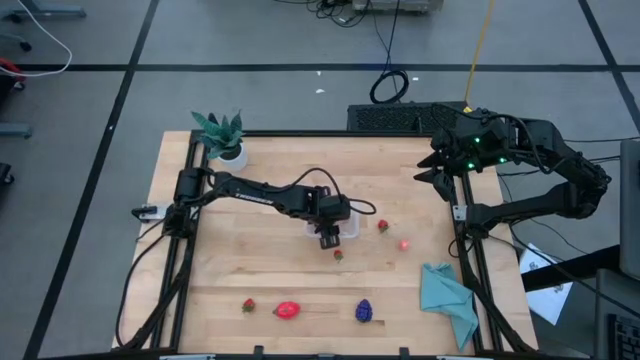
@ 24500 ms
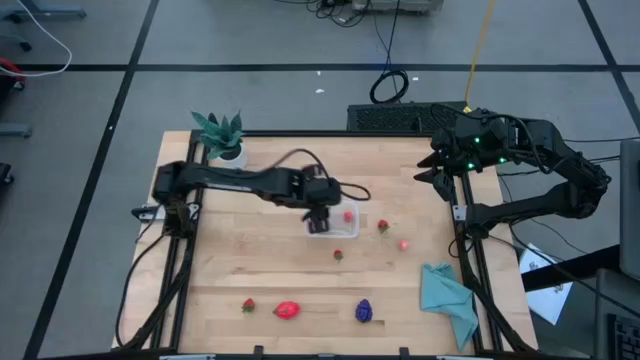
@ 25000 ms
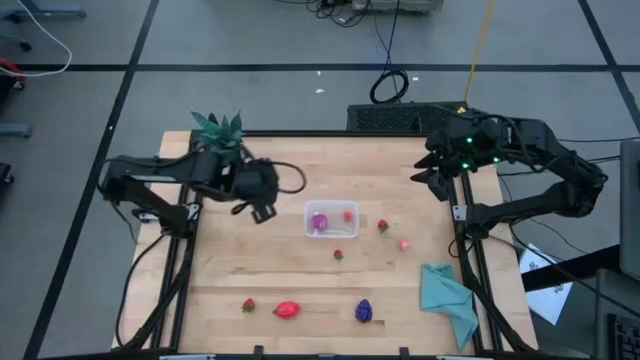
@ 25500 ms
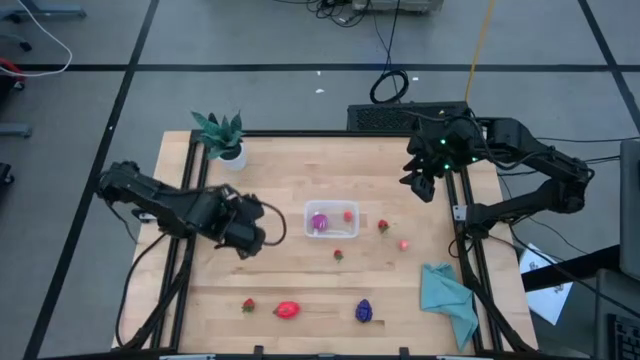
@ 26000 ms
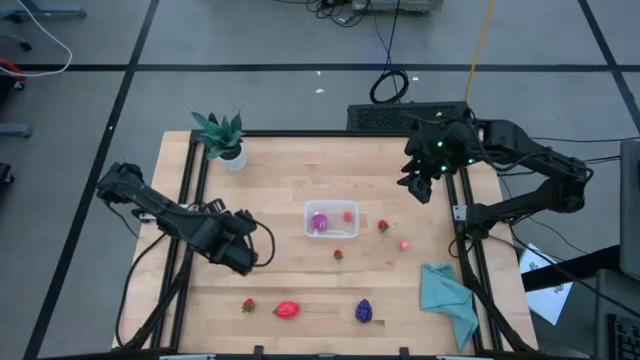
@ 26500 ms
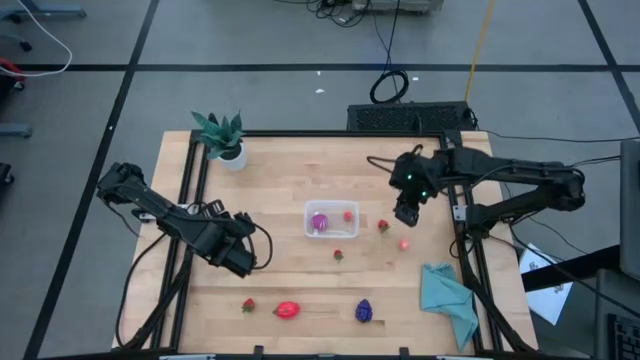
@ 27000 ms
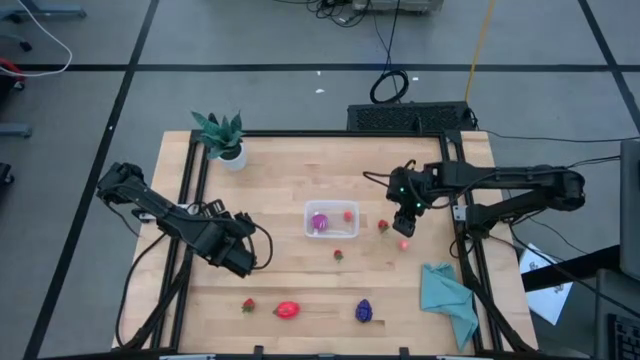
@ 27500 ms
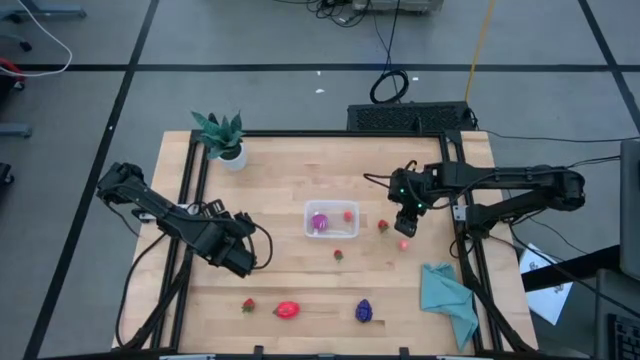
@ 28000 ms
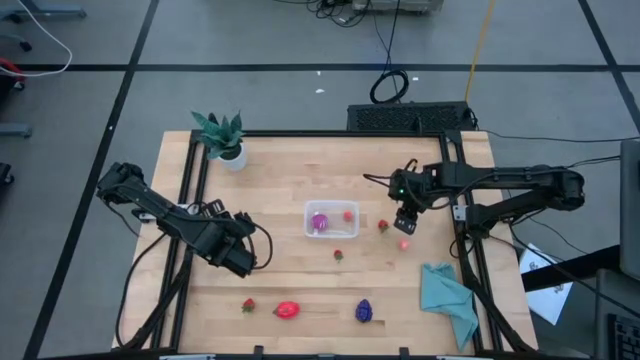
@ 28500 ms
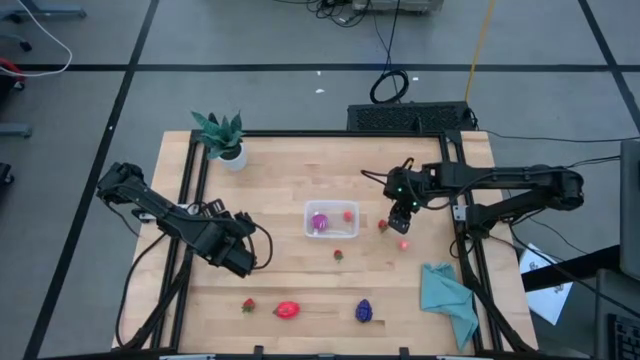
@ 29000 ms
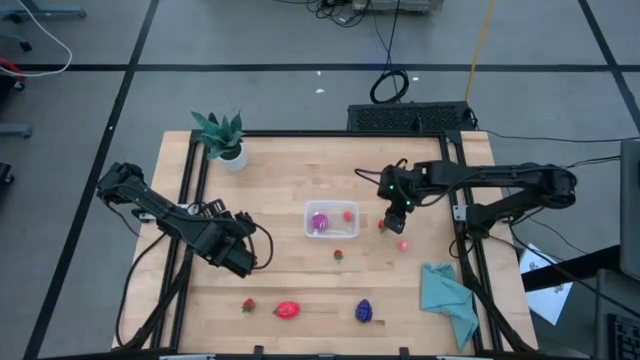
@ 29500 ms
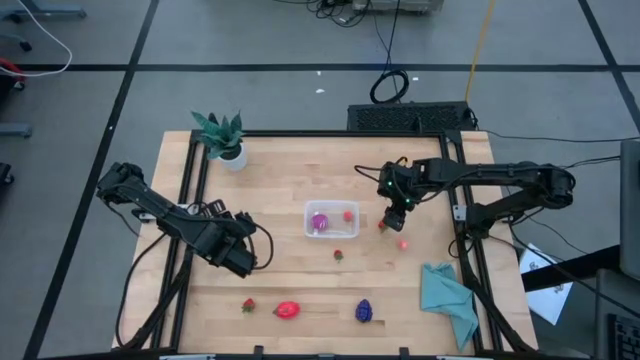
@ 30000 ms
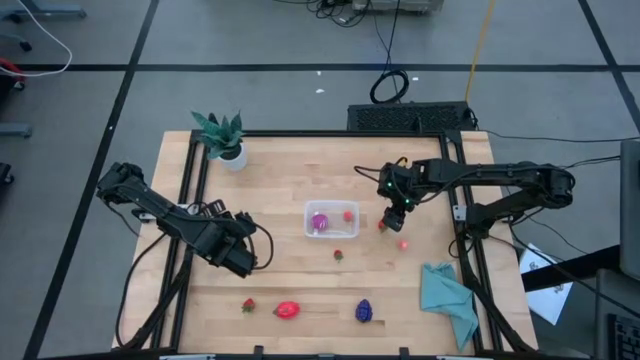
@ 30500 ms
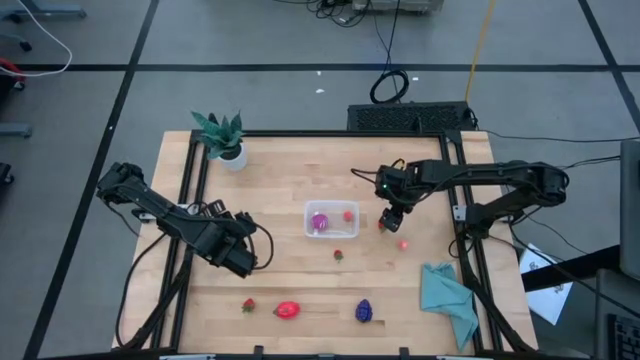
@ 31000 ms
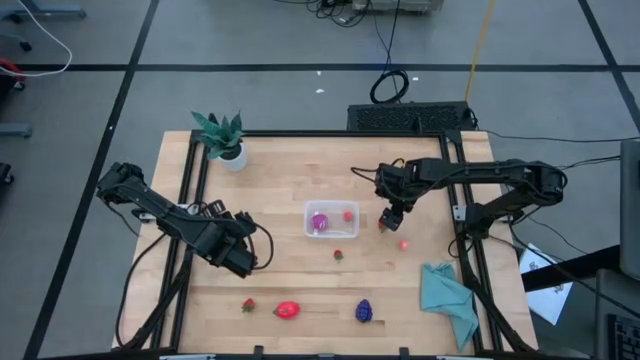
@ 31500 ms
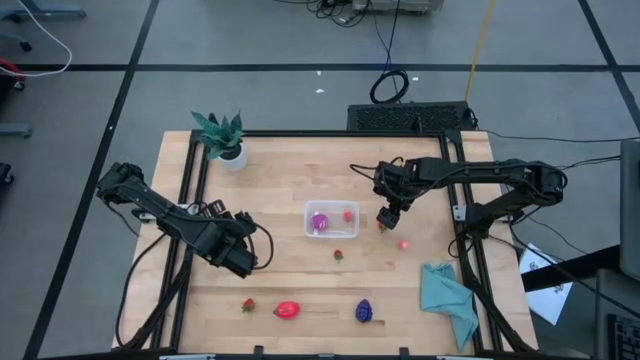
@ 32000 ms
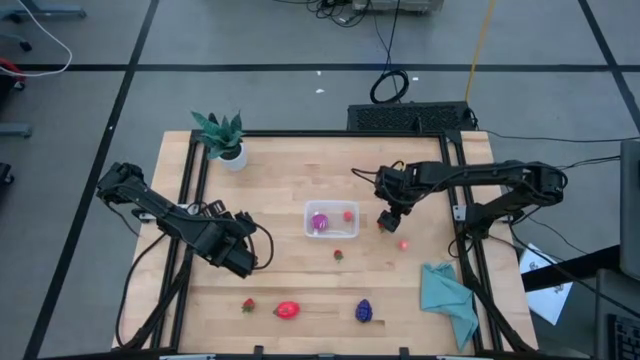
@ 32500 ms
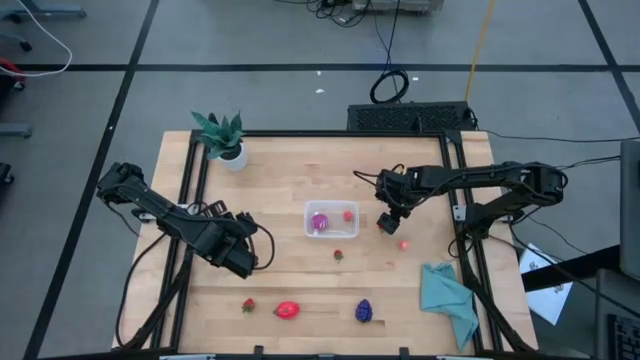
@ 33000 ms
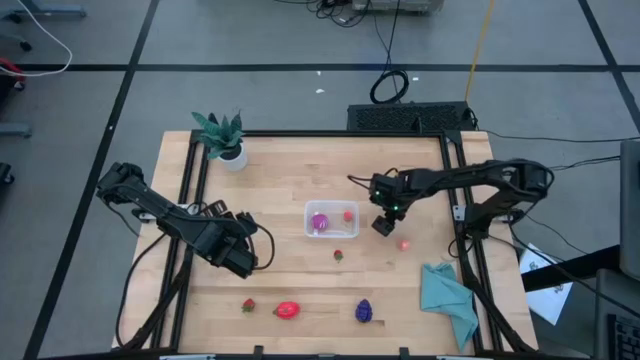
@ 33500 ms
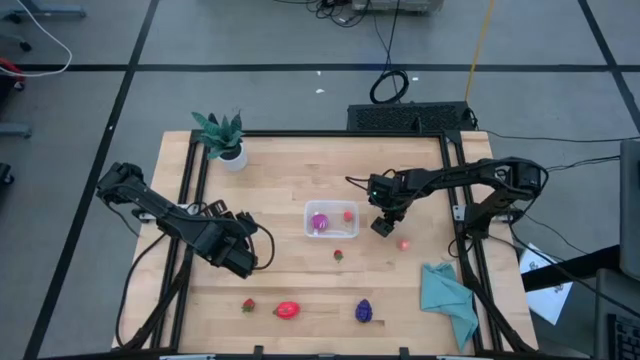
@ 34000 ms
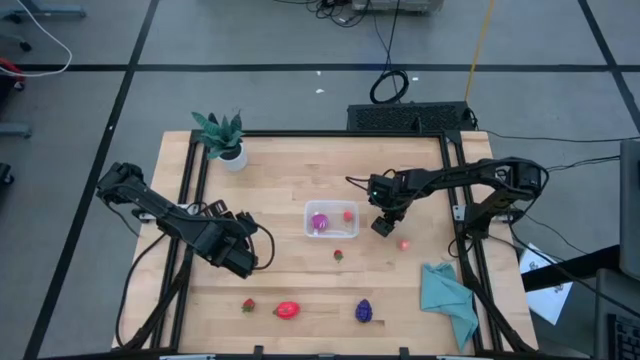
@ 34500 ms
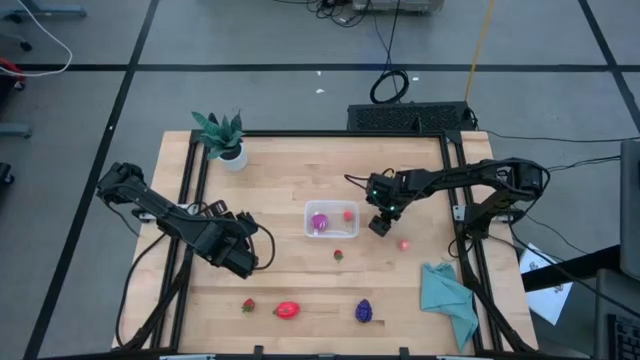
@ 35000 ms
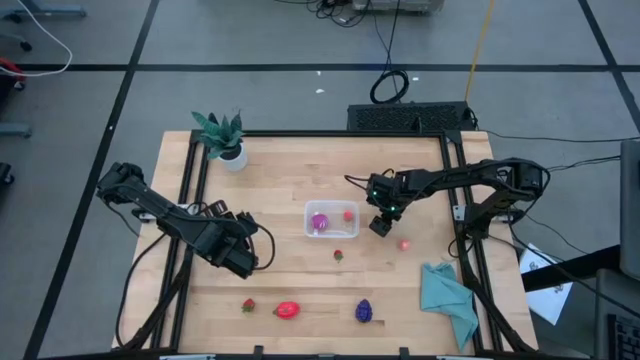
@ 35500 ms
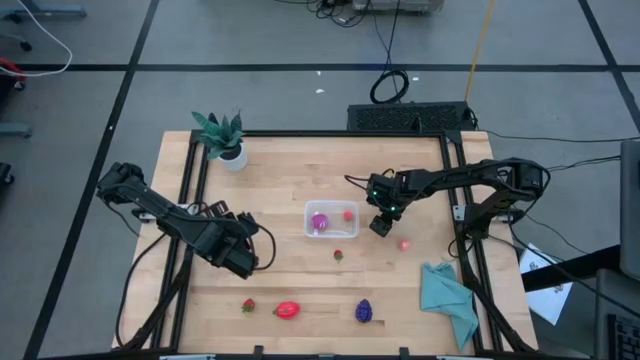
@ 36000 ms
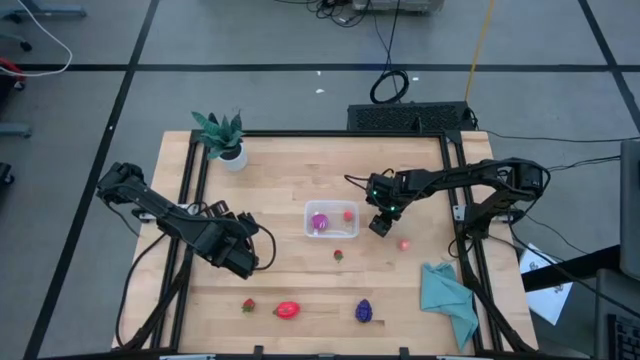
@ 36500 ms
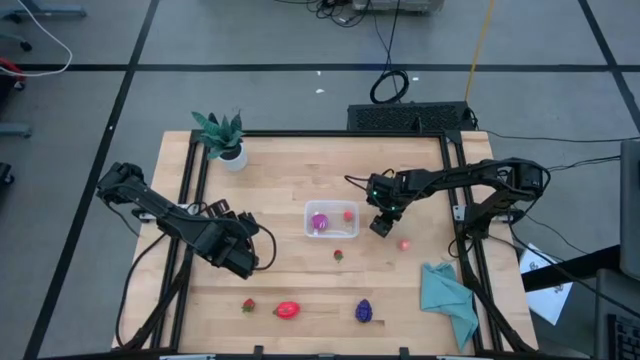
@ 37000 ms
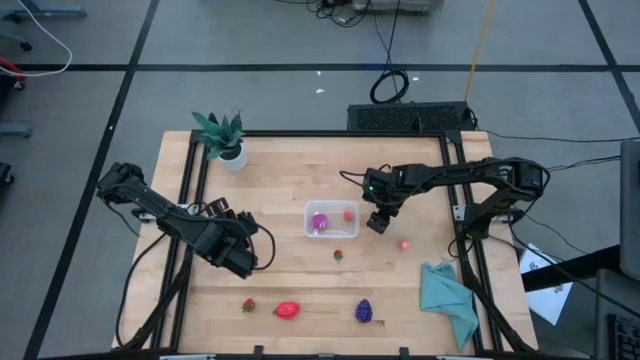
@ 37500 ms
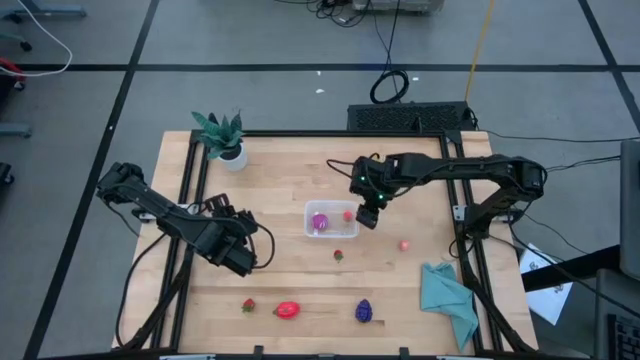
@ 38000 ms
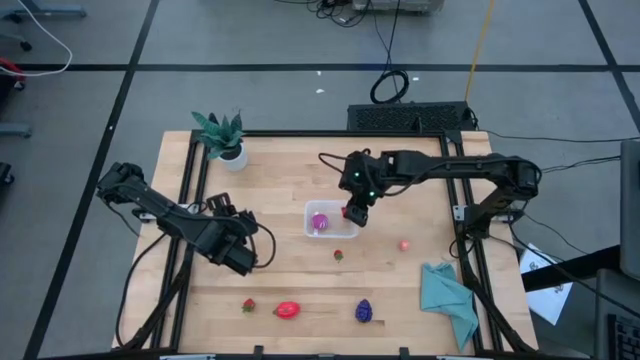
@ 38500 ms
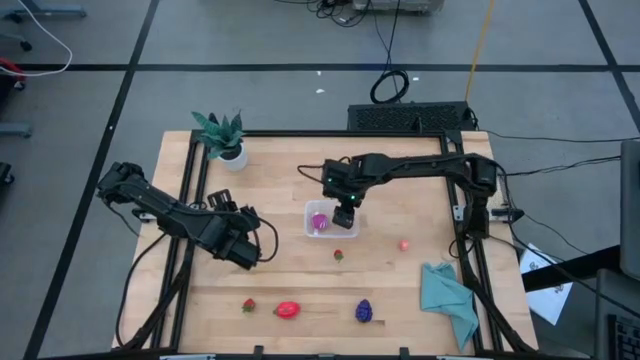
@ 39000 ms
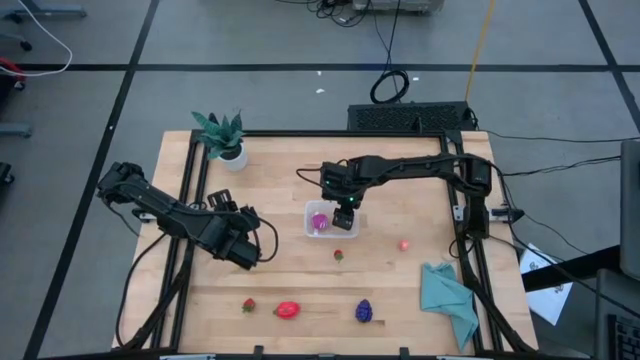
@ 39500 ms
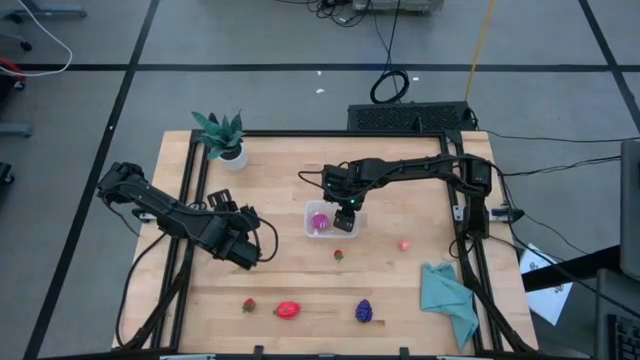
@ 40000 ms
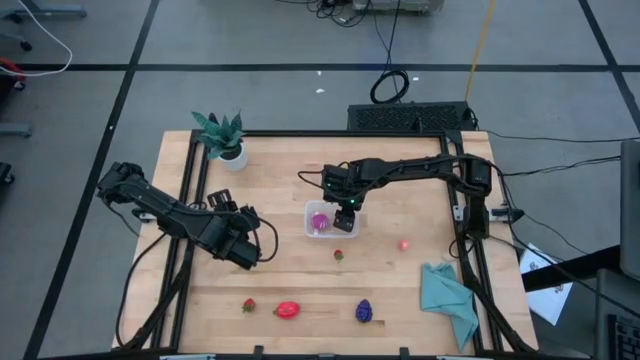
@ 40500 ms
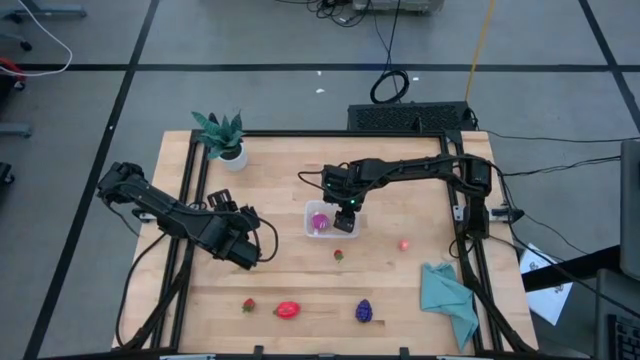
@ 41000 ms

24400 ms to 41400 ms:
Task: Pick and placing Produce into tupperware
Put the top red strawberry into the transparent bin
